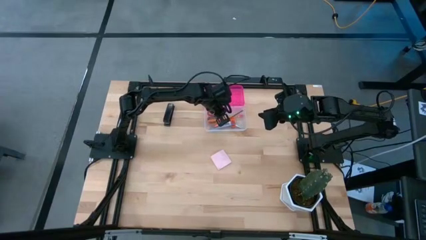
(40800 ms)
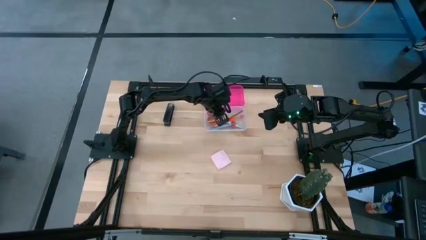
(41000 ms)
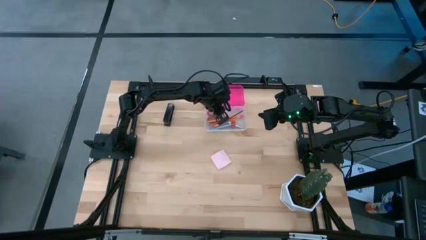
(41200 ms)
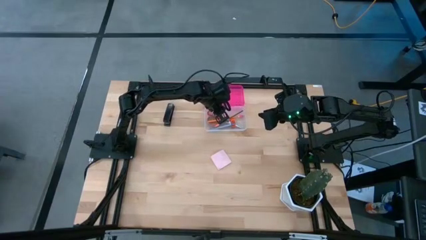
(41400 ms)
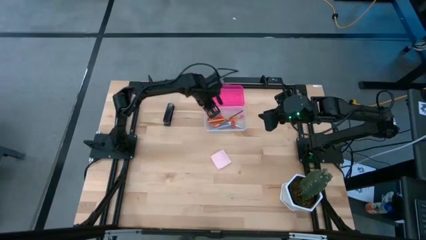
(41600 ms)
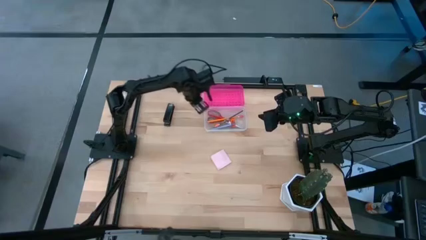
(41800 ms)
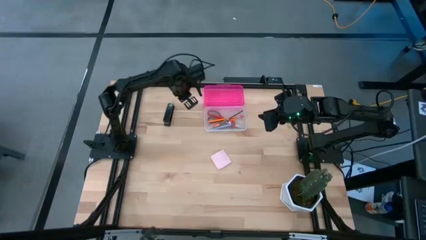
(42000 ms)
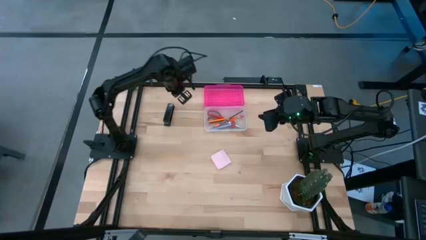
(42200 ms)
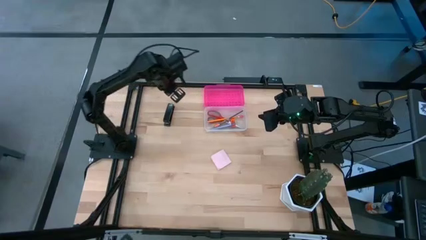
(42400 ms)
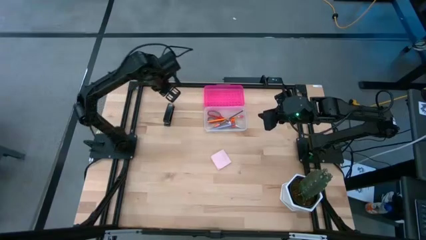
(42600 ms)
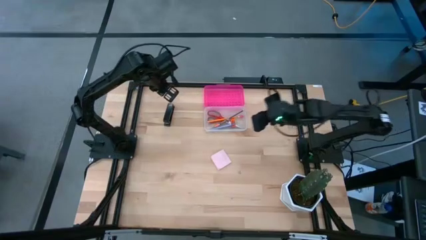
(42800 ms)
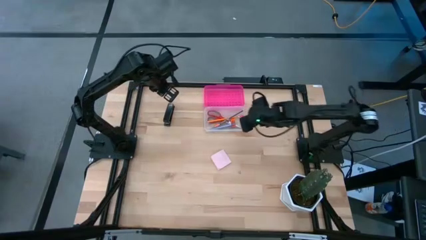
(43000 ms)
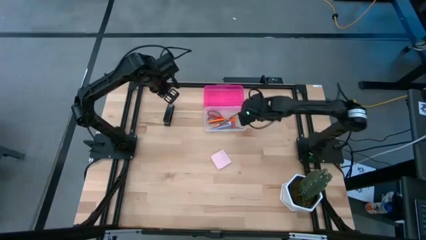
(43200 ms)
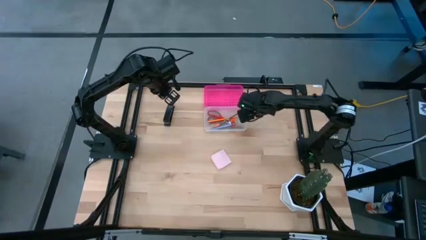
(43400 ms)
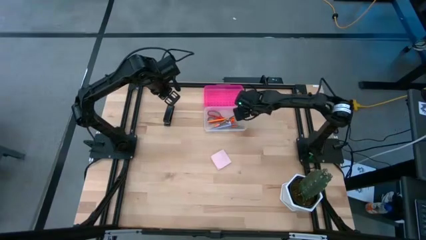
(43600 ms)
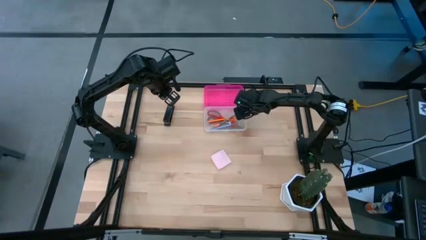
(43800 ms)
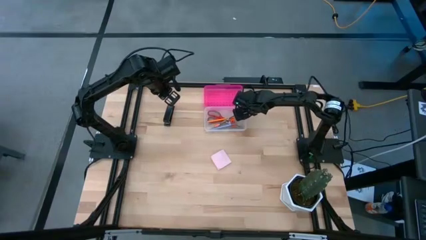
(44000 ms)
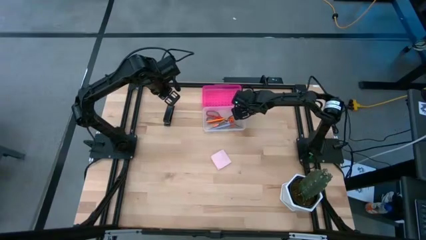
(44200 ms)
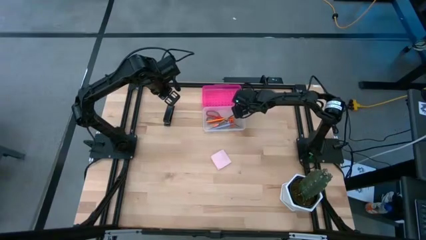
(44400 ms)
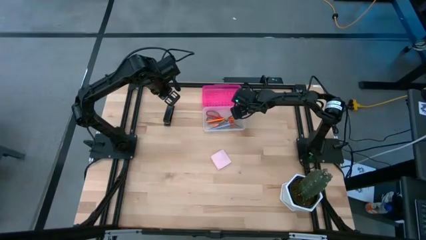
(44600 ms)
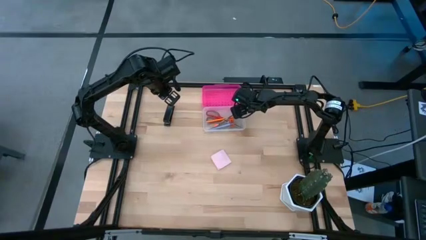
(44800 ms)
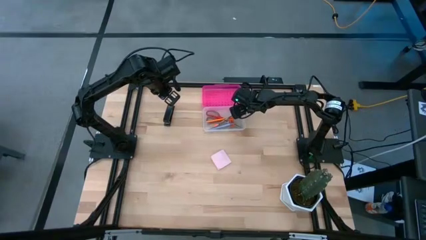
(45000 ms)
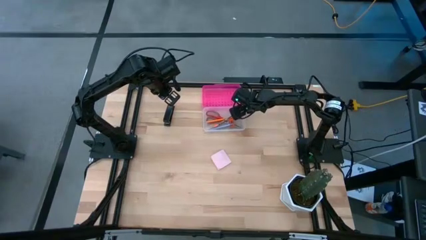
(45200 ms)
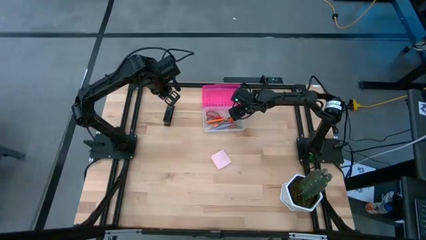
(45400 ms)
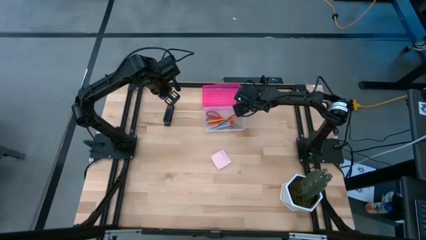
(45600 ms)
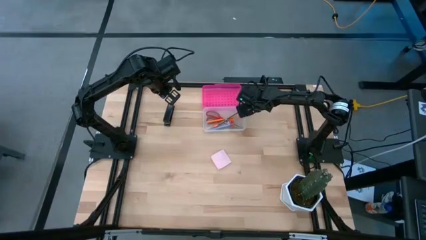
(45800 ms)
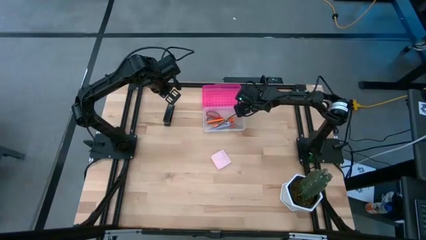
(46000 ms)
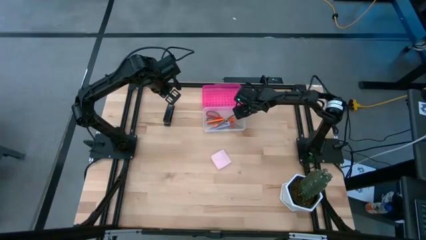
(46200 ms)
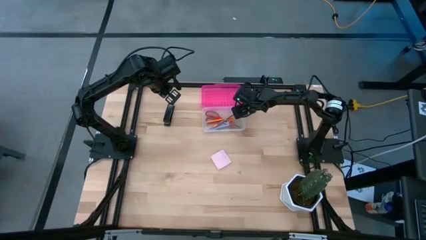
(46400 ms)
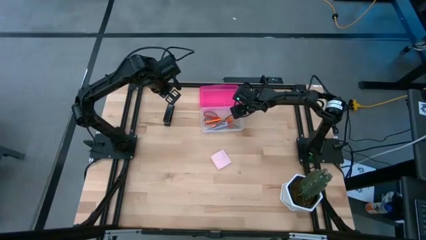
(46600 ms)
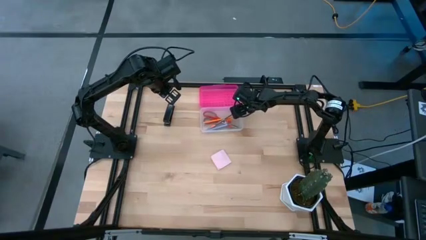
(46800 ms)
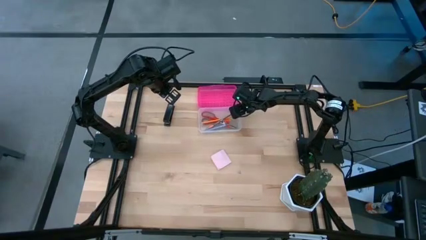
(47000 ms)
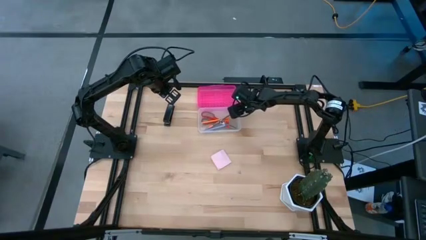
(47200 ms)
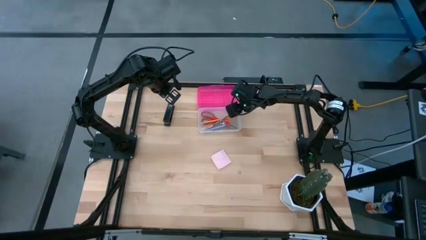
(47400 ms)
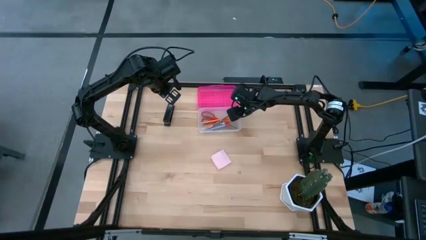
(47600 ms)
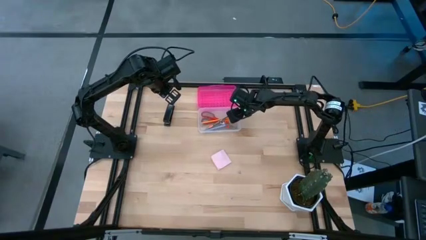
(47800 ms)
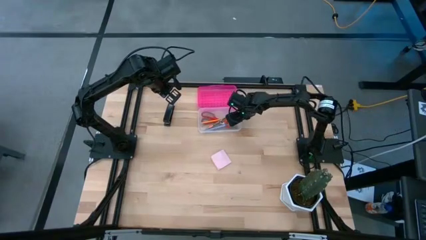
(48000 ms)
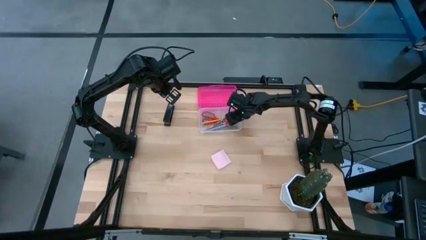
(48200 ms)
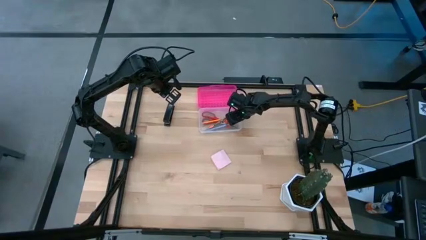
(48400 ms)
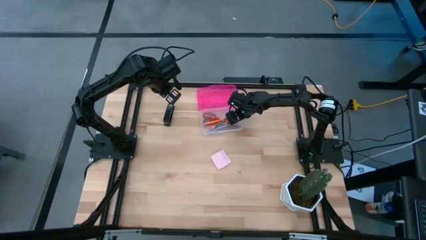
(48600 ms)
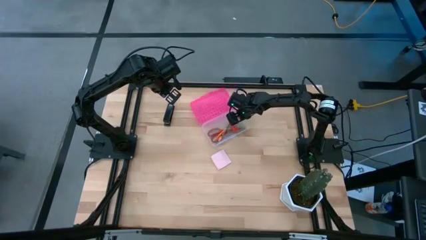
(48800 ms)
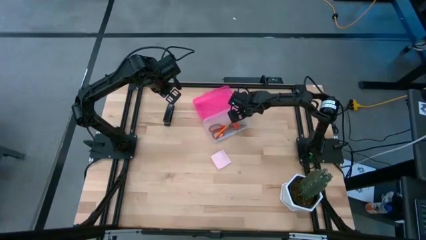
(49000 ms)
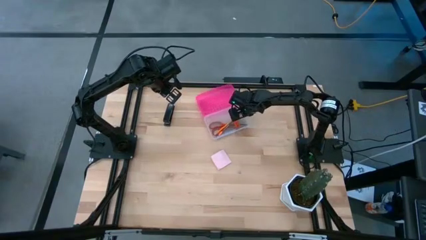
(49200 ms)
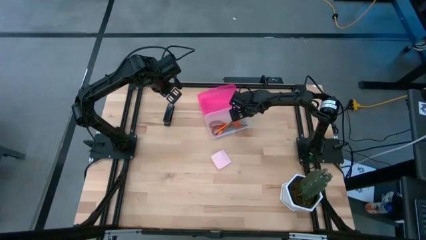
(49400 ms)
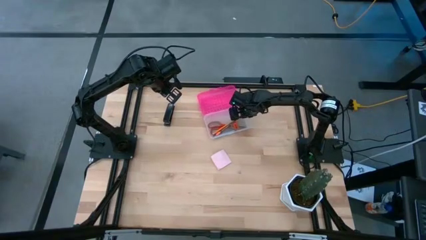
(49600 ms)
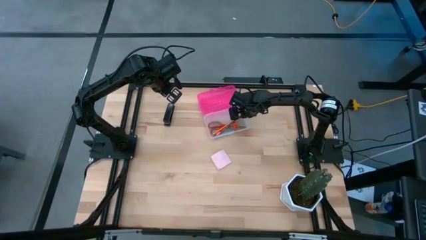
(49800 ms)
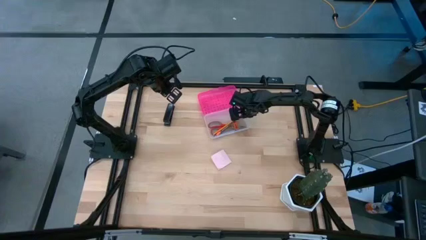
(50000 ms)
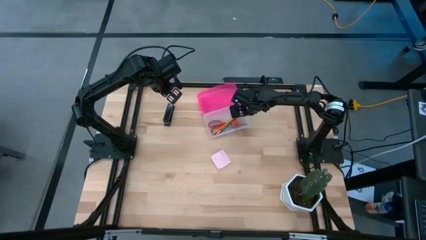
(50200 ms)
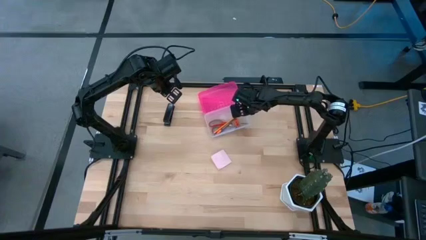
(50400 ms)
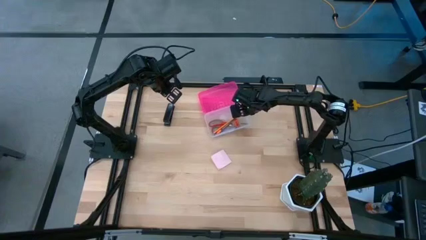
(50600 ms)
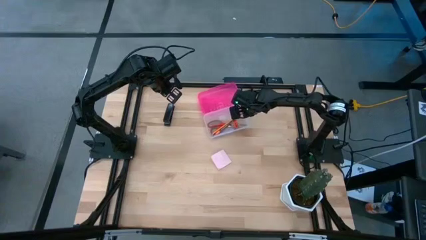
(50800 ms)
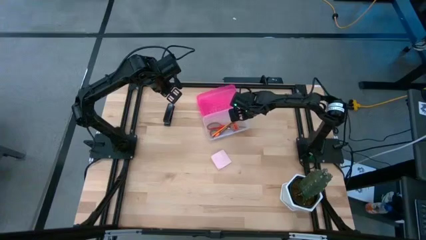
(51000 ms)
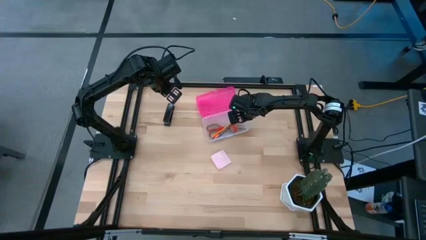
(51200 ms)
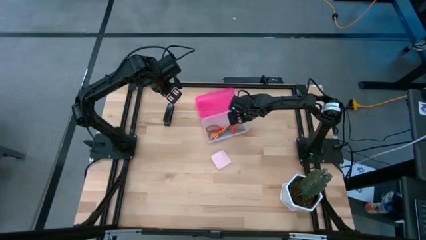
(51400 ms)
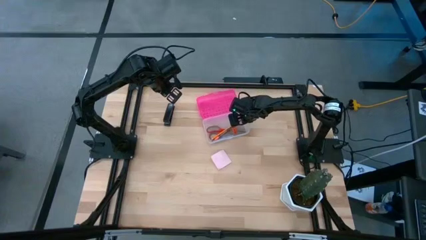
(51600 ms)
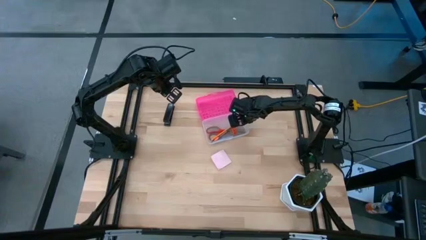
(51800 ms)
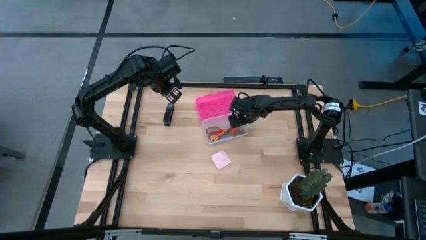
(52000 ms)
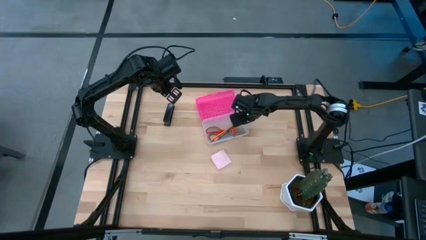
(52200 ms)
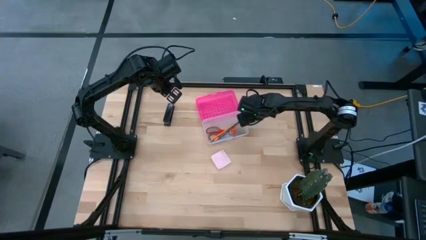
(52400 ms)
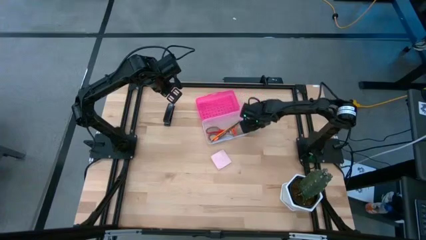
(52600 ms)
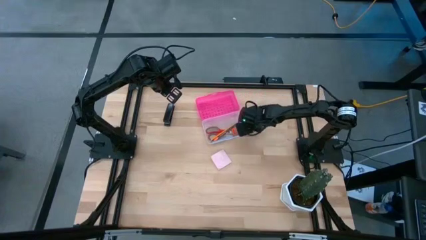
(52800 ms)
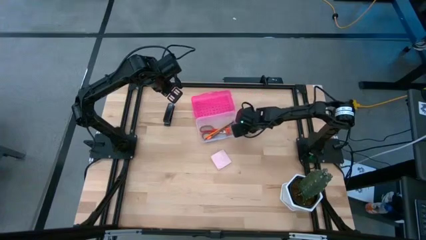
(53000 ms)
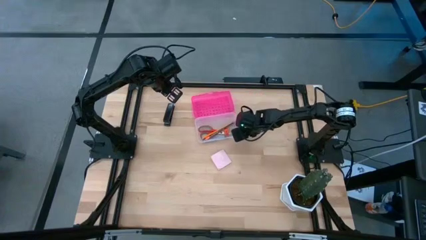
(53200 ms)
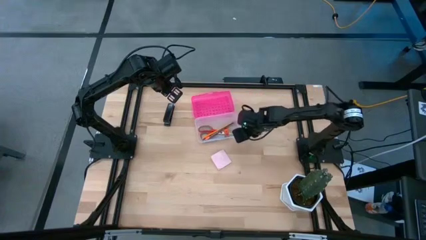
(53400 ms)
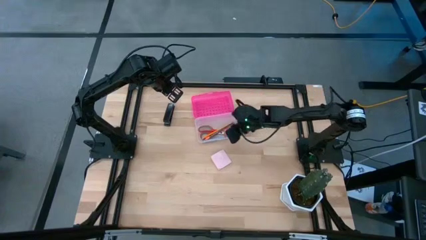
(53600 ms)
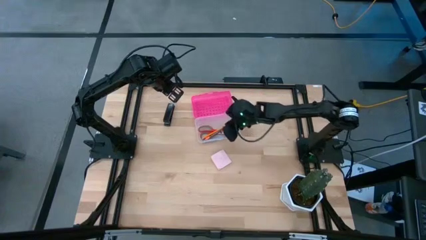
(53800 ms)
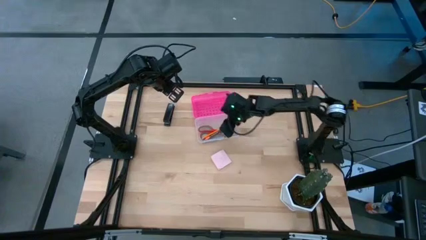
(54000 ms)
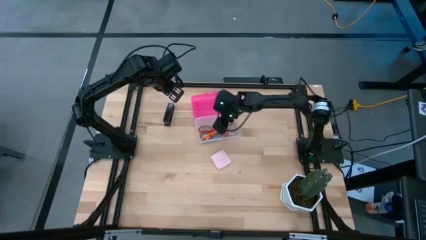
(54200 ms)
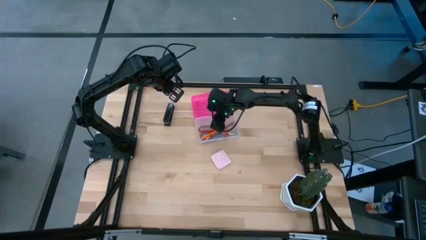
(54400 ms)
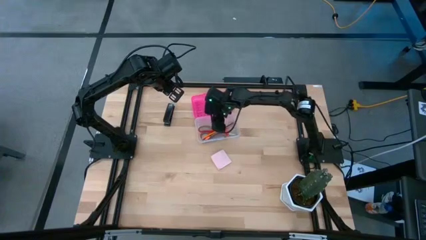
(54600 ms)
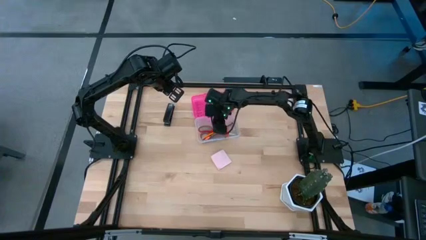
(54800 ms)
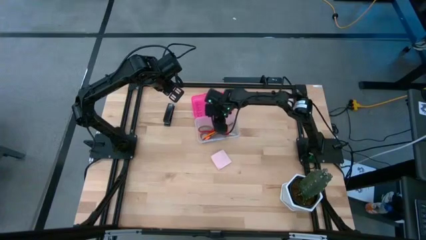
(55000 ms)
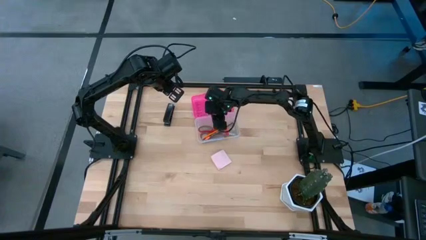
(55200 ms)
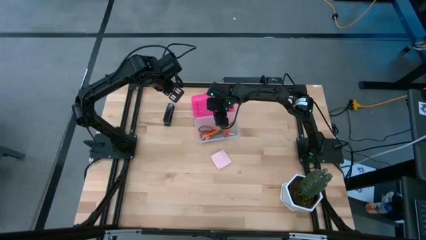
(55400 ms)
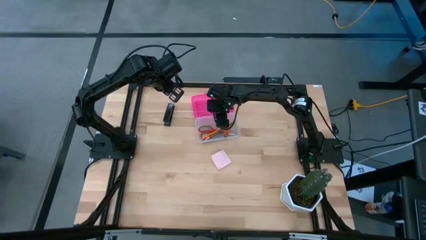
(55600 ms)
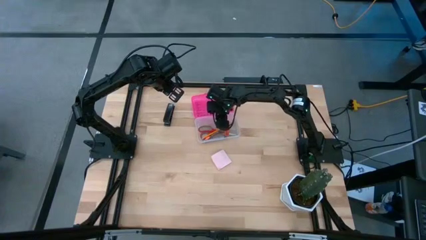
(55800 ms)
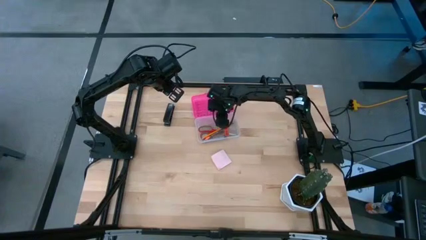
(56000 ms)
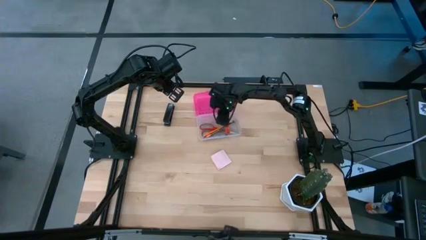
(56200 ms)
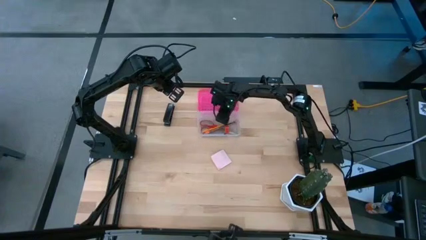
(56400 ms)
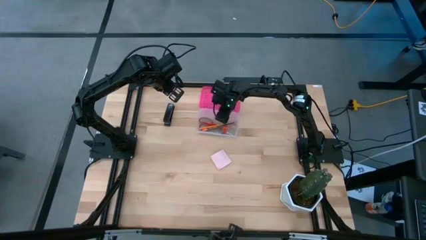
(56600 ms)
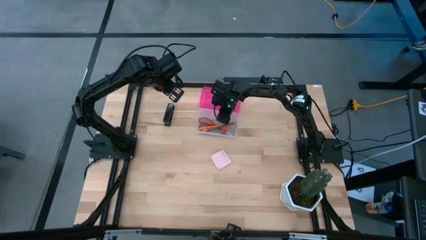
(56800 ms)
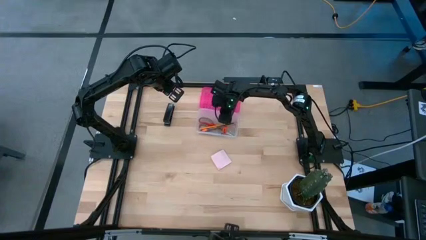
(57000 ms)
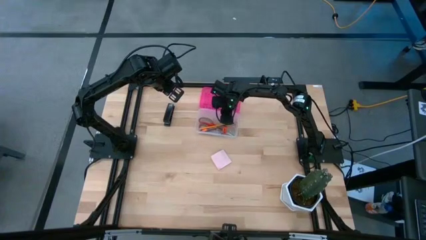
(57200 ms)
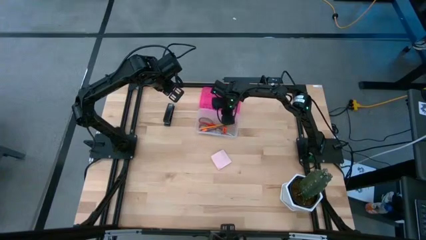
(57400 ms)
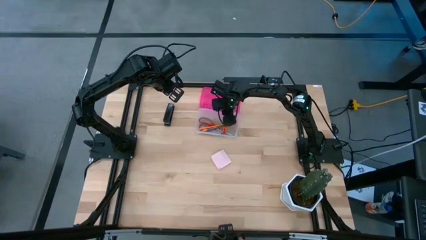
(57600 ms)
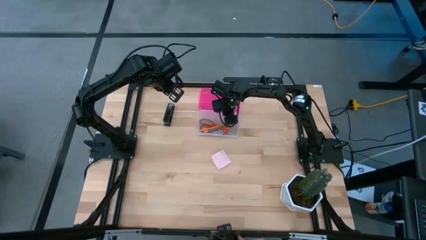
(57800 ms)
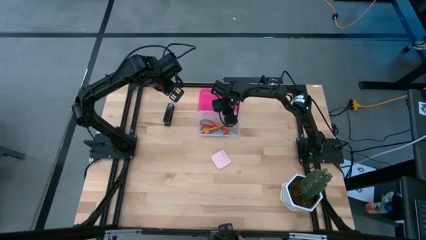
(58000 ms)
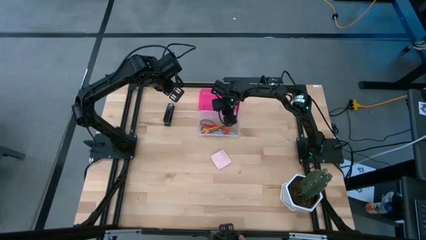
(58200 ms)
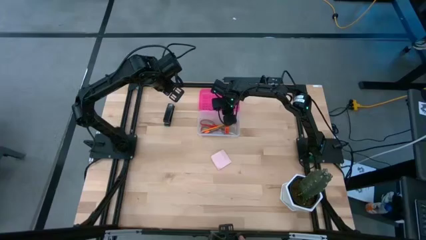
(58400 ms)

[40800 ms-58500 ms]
Task: Pack school essentials
Adjust the supply box
